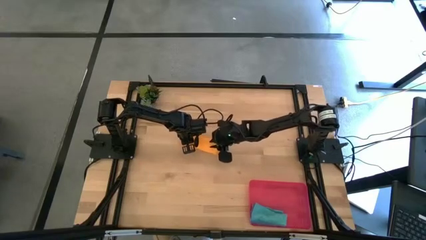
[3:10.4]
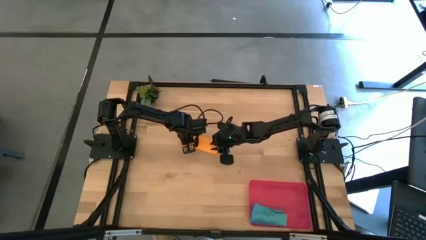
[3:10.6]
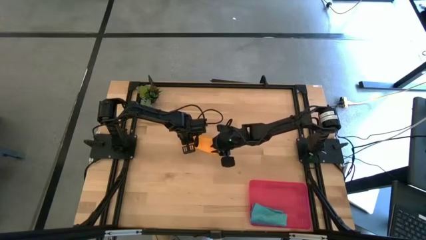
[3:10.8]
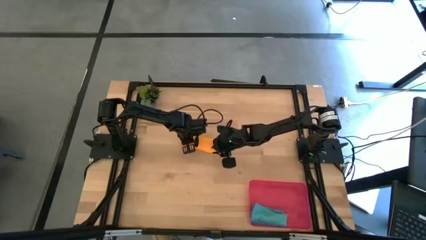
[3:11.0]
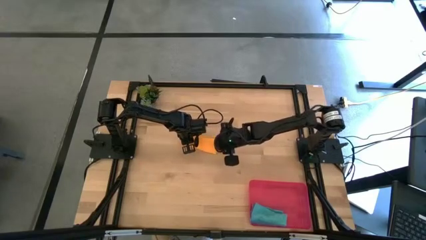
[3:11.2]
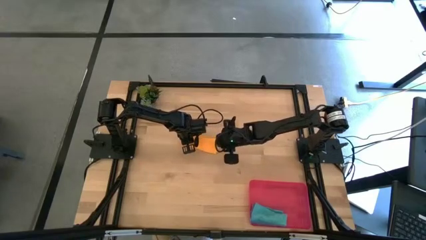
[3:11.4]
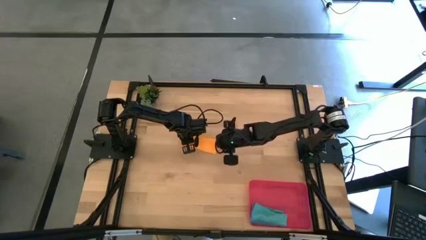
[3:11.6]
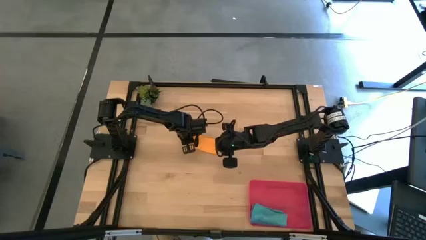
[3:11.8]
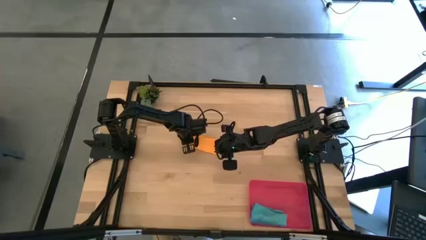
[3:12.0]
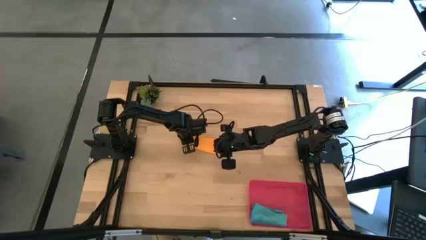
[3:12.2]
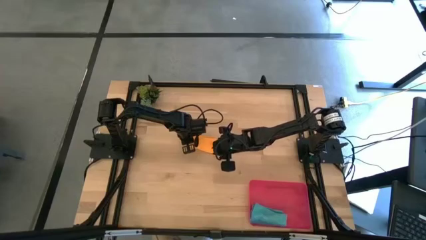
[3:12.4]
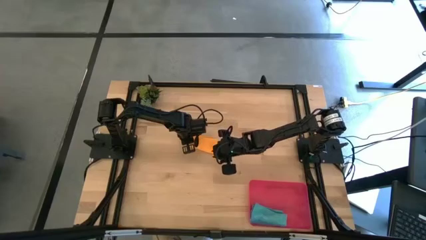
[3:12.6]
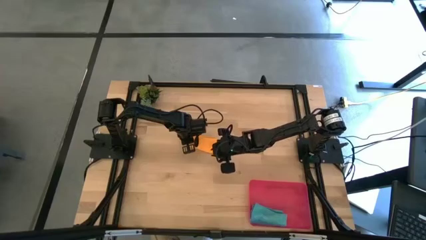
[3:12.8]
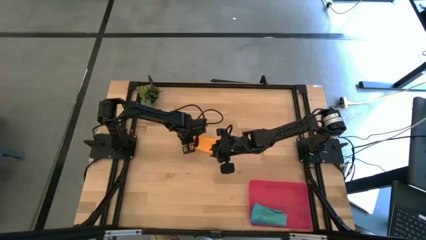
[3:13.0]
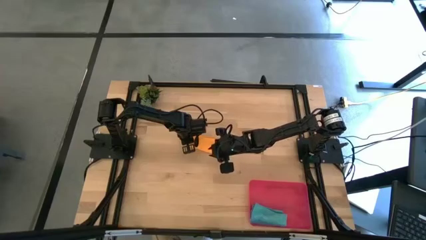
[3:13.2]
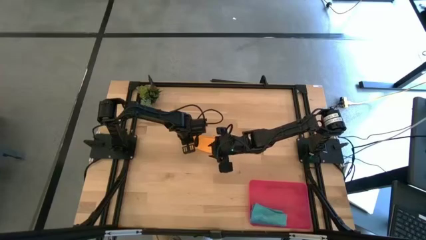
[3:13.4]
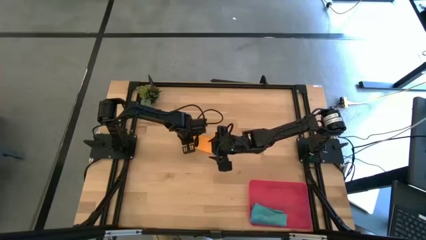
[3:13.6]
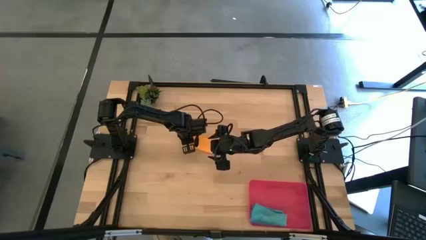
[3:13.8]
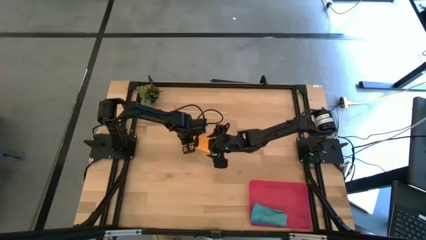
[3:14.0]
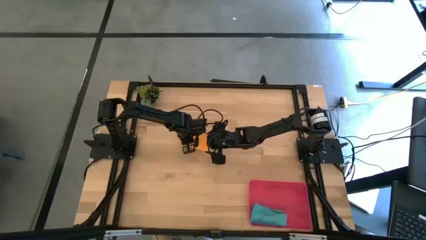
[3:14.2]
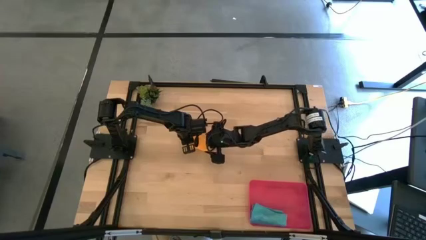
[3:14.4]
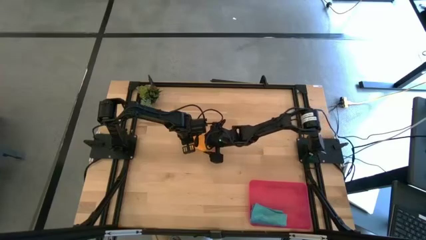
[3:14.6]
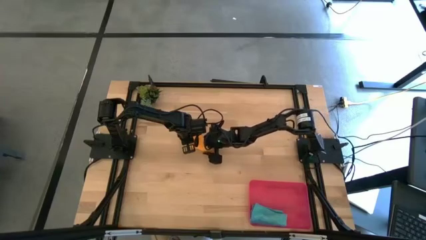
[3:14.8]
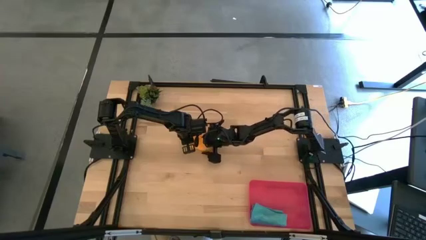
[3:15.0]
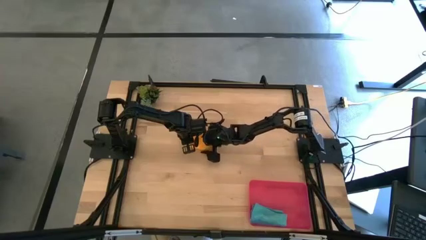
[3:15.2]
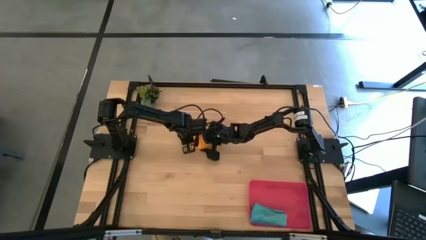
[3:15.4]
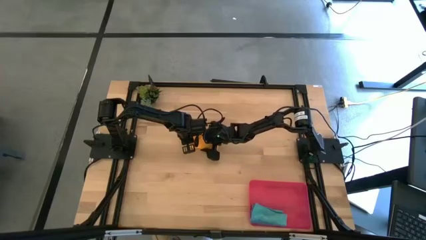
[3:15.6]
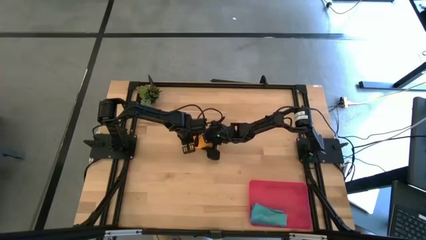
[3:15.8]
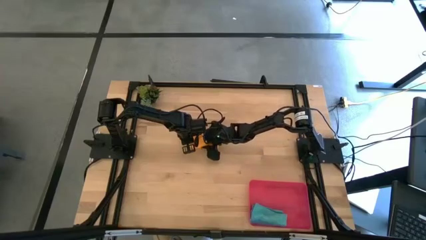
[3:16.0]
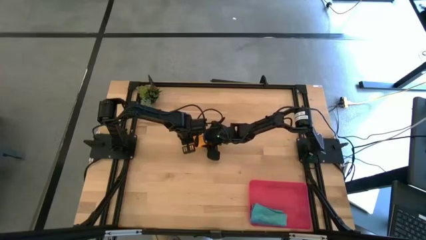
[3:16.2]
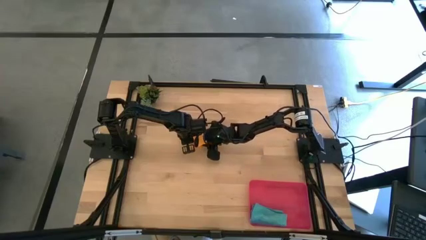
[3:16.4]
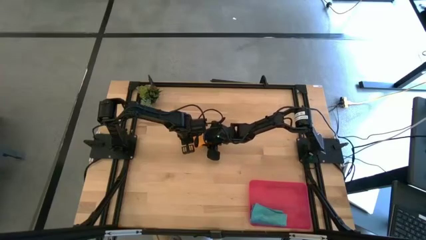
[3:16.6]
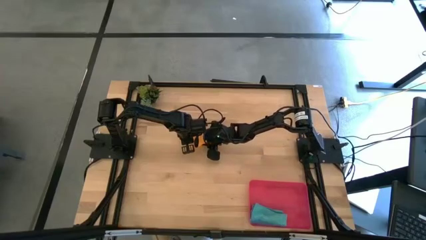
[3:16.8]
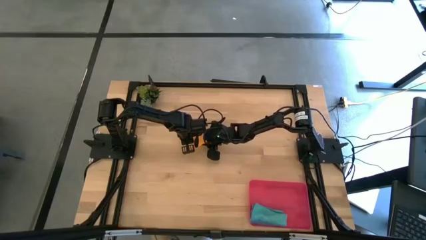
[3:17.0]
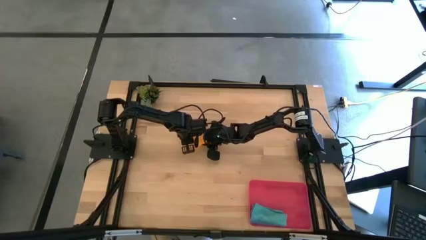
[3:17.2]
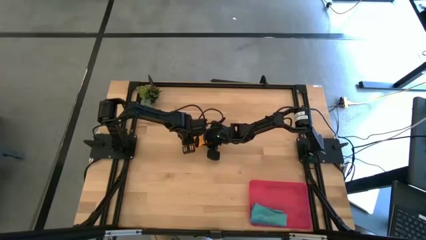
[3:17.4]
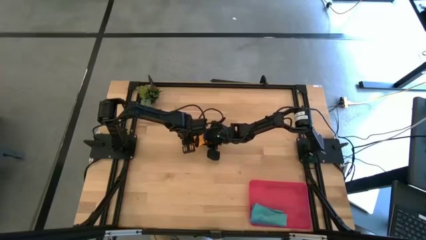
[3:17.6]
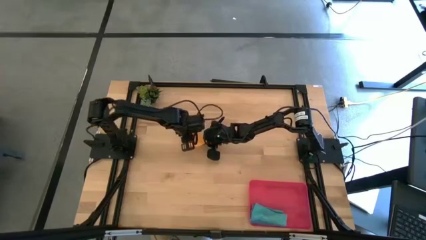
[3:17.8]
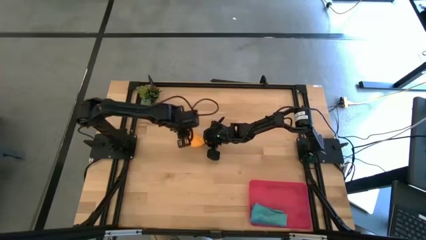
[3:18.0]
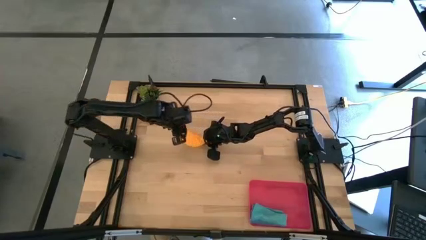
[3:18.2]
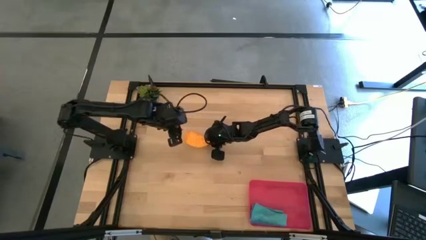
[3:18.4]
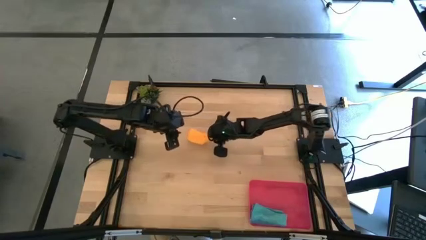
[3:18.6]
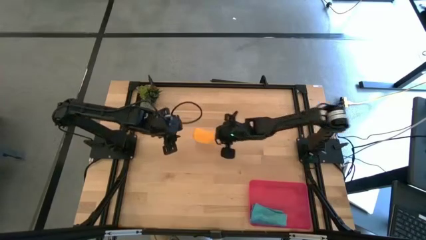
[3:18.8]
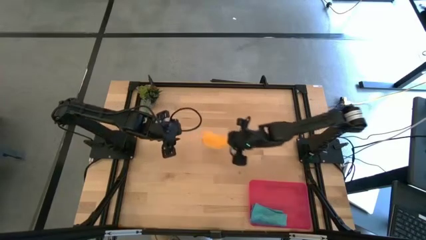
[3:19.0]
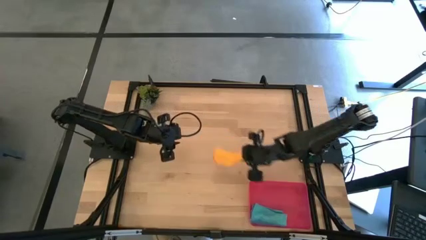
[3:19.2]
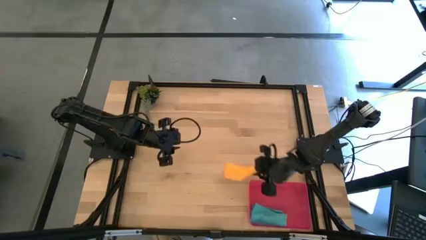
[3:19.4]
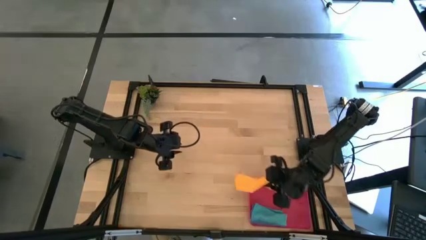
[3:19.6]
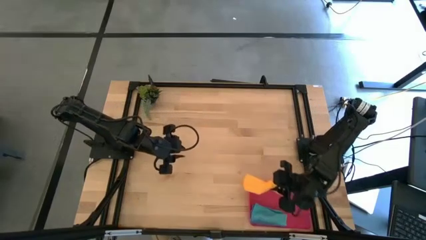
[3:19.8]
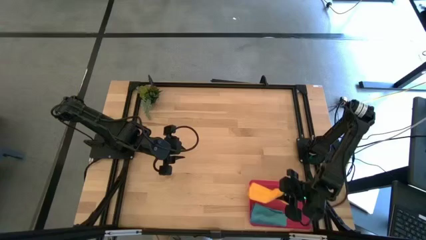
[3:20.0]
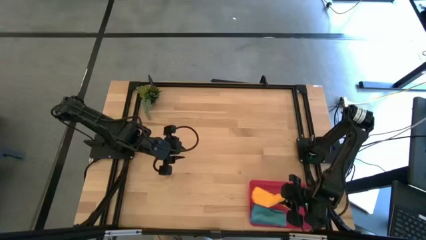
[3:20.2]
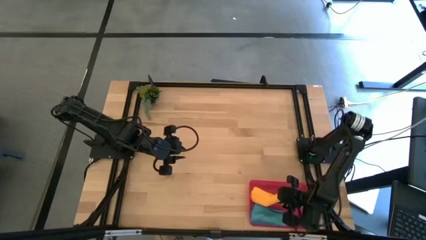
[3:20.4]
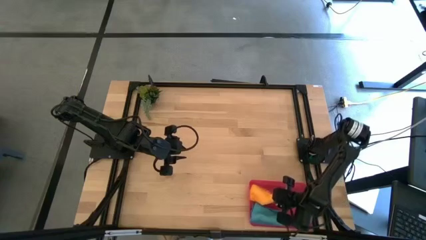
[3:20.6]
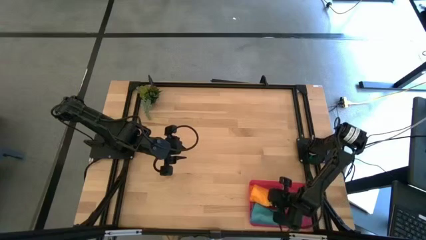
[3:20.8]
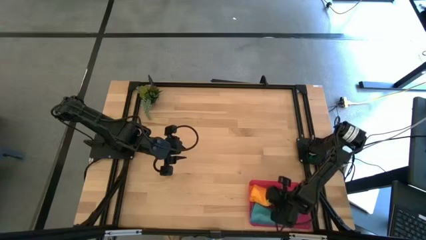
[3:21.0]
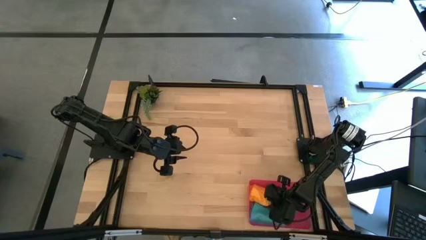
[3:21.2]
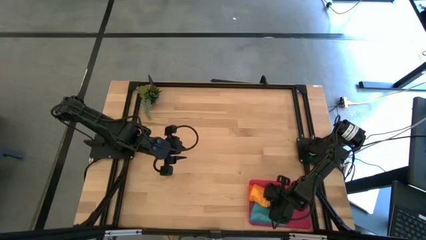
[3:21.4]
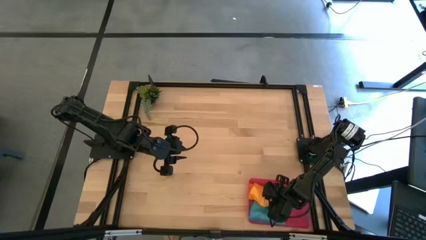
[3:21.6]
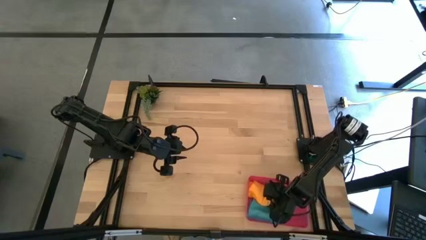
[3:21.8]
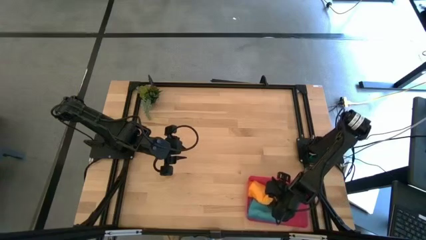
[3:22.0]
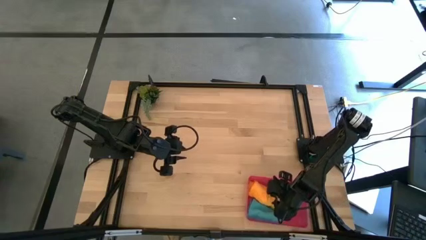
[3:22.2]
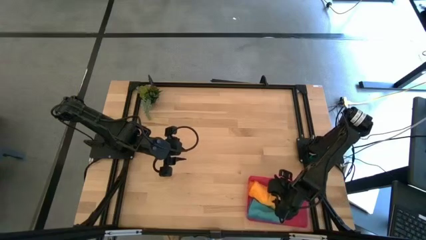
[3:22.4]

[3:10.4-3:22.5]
Task: Roll microfiber towels into tight, uniform cylinder then place into a basket
Put the orange microfiber cloth into the red bin

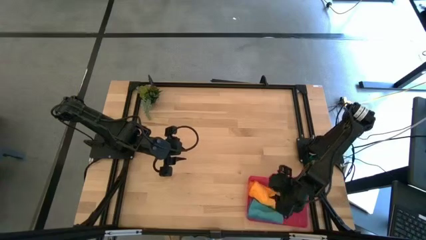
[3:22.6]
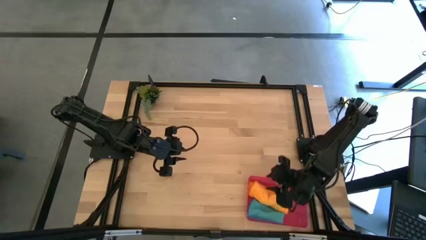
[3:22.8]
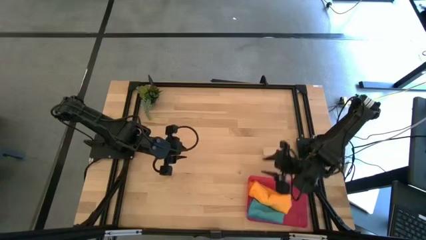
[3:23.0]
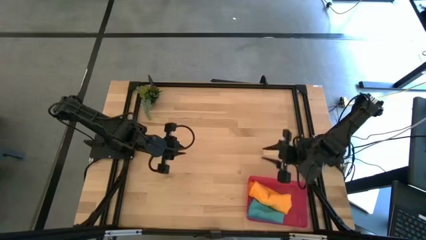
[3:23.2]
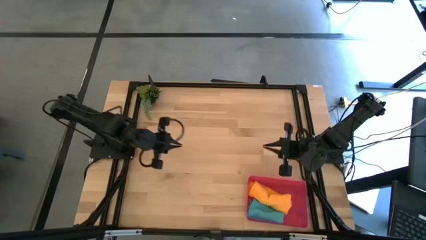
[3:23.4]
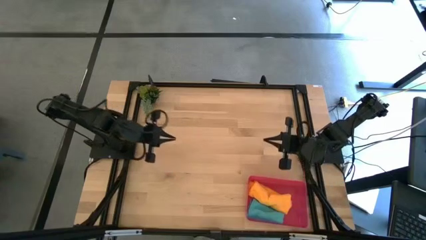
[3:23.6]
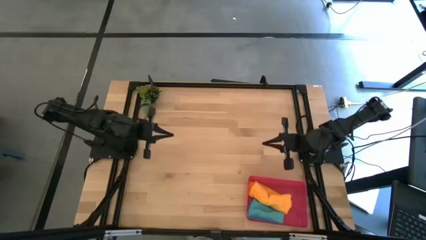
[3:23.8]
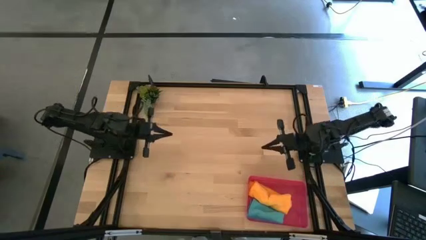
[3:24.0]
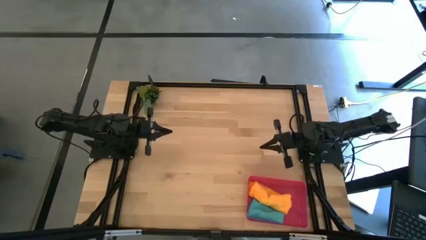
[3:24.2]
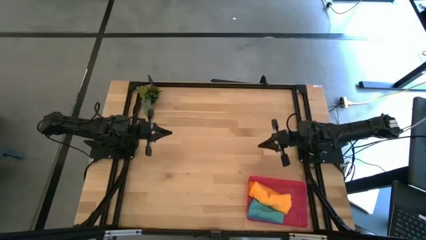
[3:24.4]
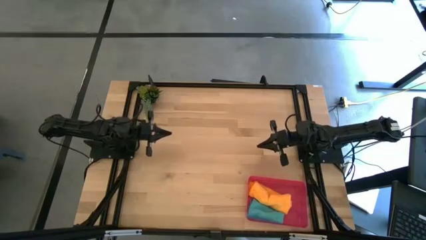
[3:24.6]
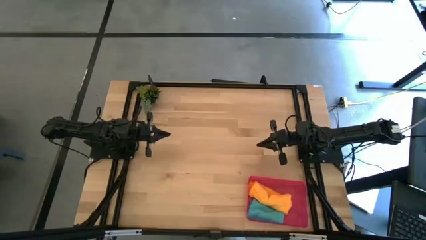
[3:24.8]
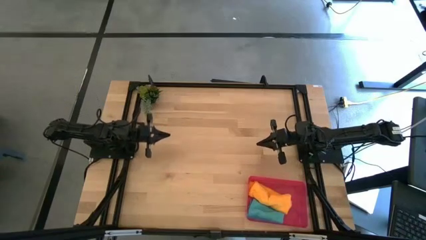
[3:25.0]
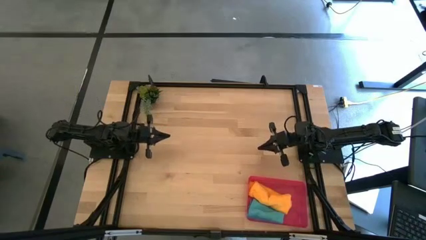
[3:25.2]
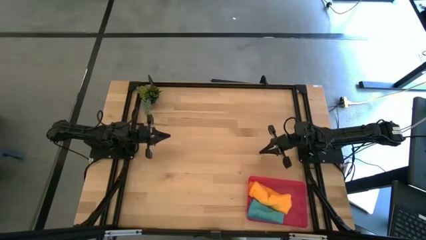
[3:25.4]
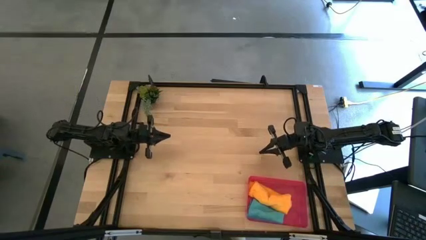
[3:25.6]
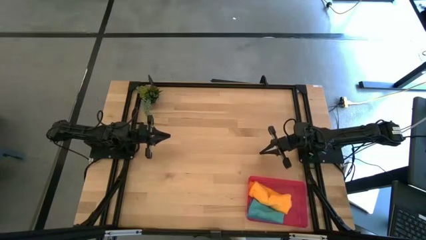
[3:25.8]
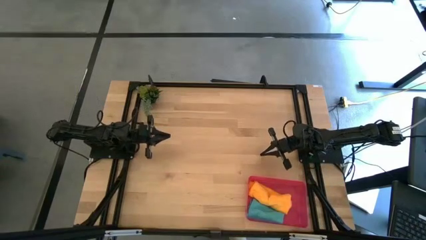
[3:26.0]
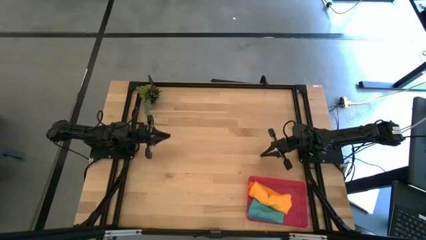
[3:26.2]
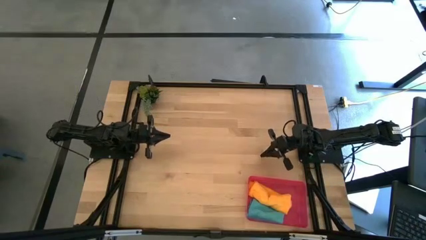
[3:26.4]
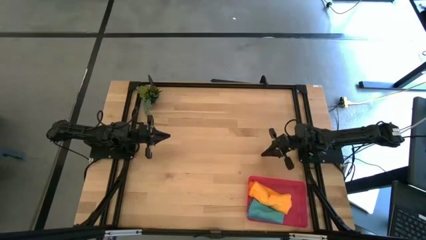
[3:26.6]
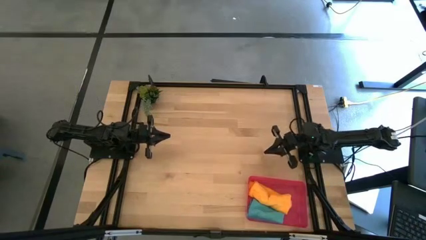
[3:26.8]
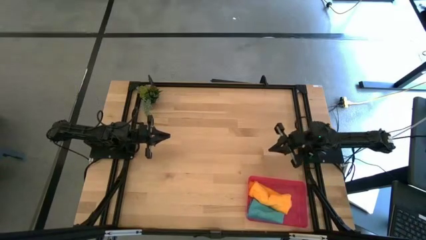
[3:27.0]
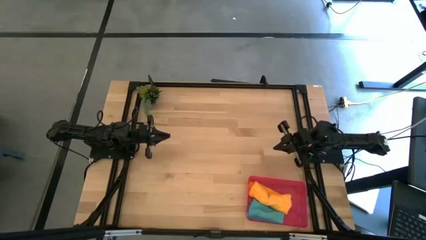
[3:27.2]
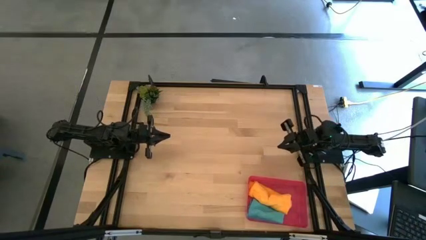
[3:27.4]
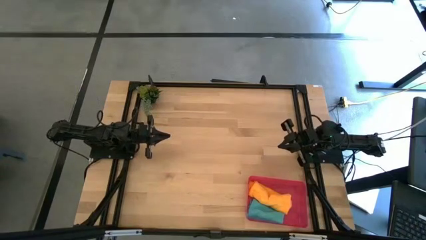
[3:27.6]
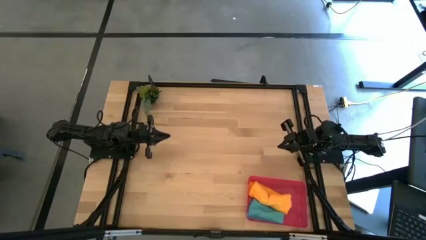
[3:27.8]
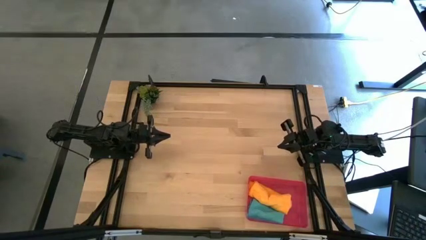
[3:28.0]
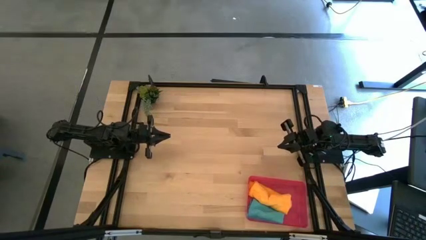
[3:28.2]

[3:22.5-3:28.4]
Return to Home Position
